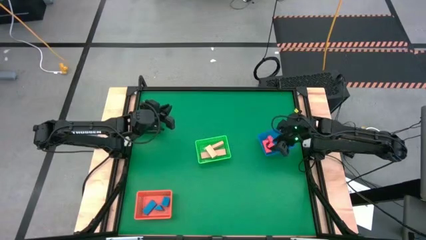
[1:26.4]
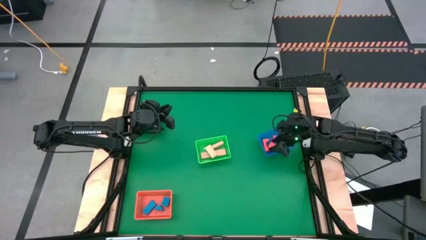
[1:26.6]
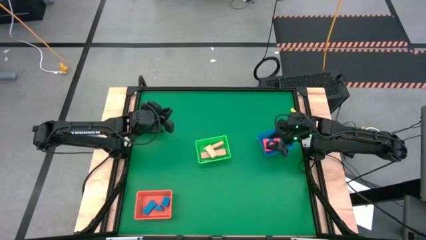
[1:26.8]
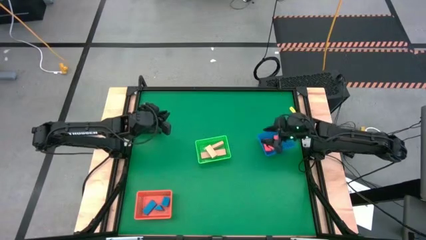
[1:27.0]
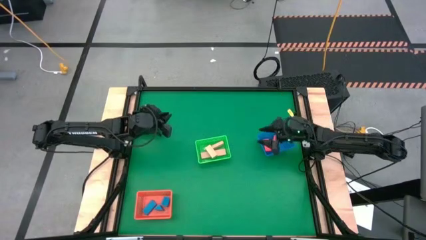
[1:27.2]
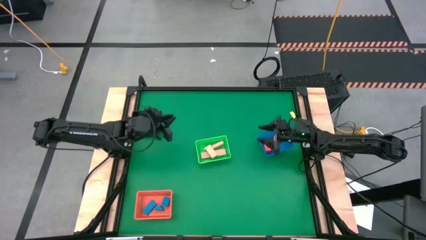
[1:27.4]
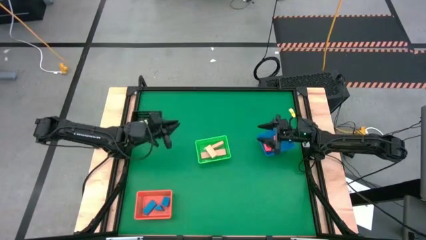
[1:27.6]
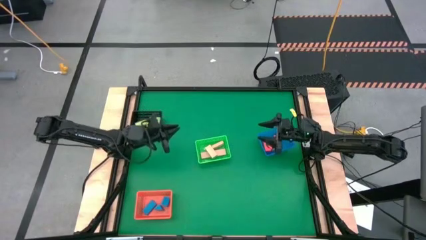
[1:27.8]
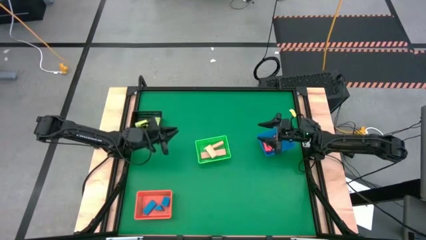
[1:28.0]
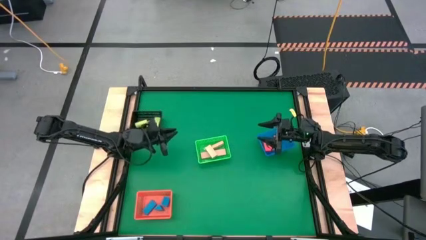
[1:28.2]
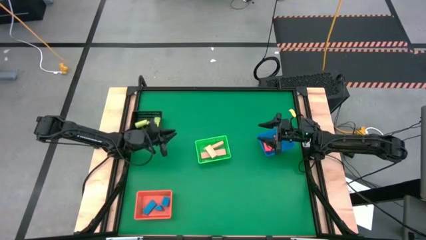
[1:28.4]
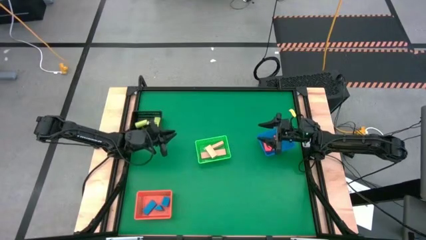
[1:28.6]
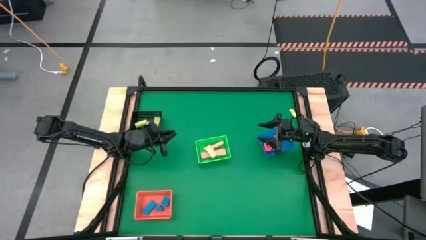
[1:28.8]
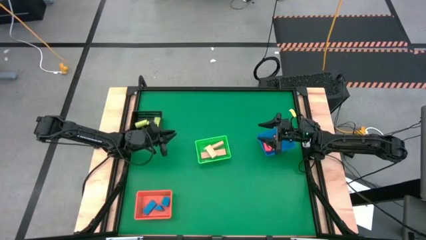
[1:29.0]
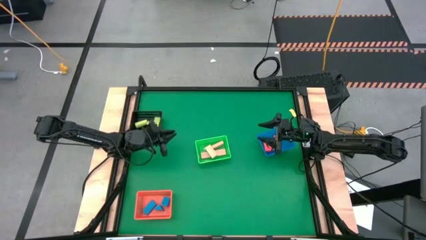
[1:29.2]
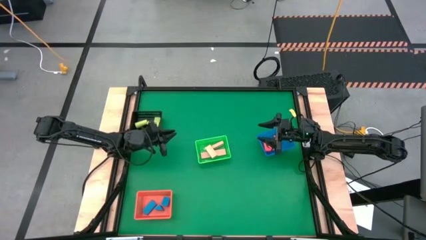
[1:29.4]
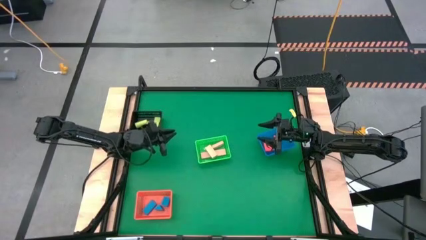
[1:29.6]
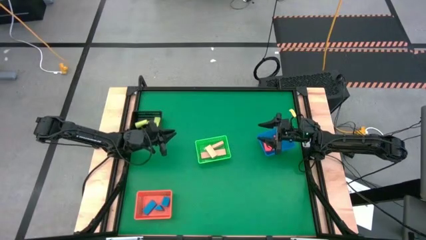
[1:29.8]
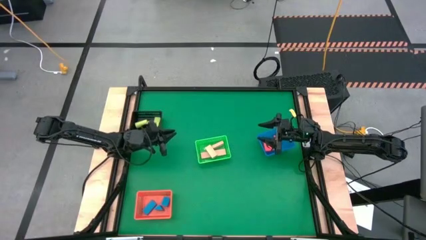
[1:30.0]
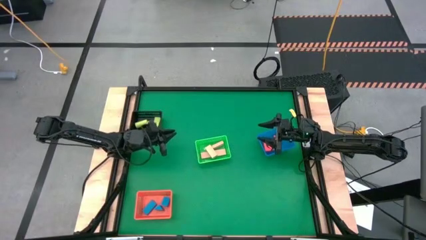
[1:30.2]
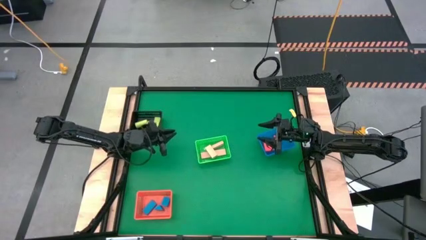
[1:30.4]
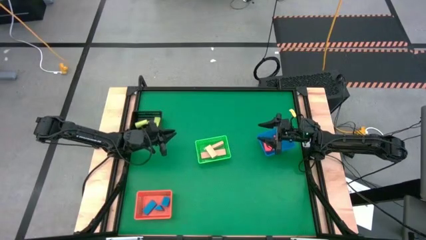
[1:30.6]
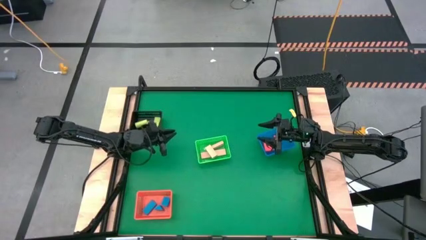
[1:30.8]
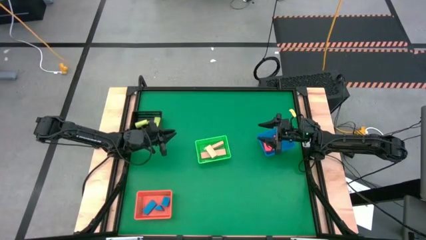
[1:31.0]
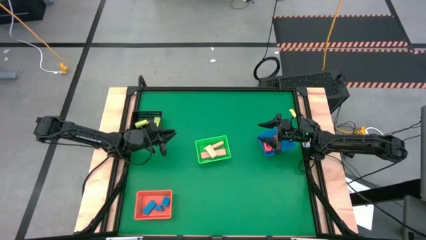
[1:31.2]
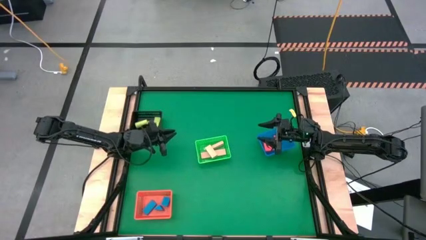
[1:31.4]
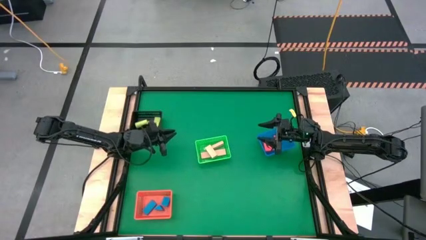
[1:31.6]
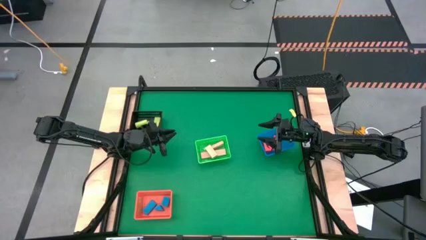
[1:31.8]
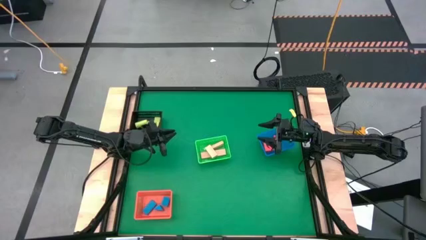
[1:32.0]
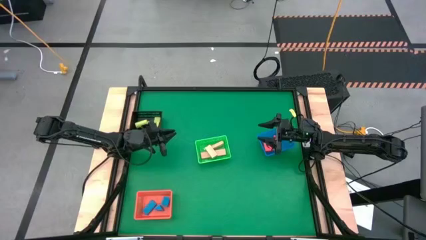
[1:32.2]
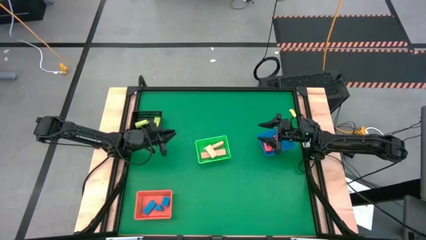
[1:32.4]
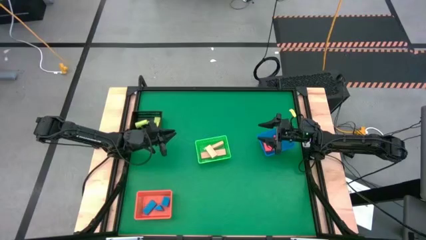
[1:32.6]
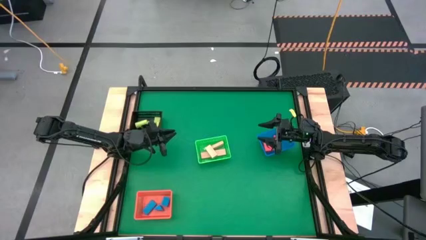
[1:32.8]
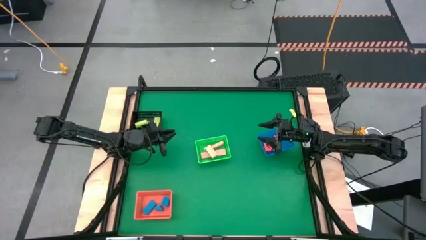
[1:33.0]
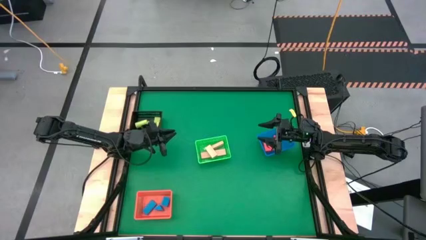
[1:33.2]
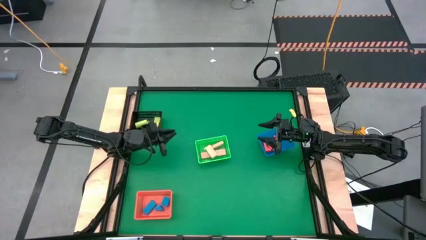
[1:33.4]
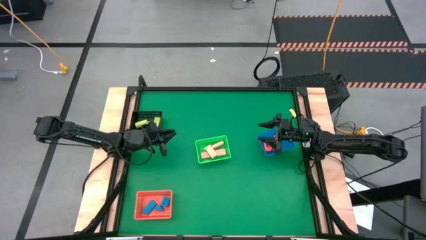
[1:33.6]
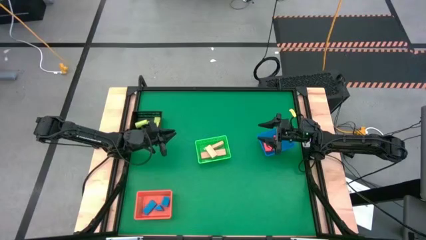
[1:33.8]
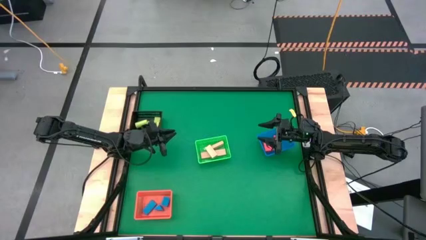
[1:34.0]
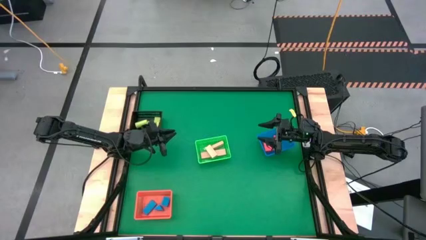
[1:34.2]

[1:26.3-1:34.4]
Task: Sort & place blocks by color
Return to Home Position

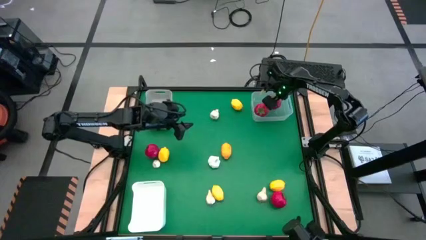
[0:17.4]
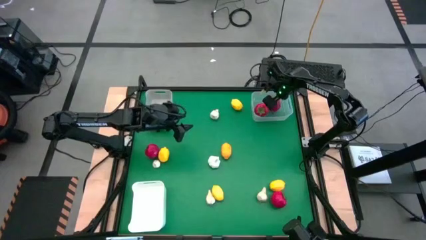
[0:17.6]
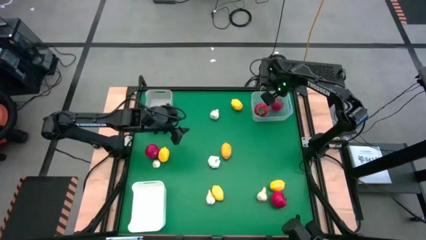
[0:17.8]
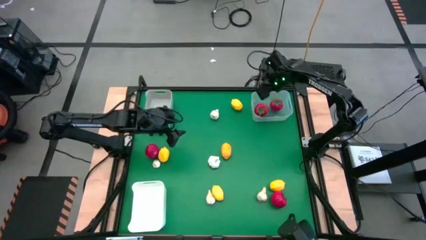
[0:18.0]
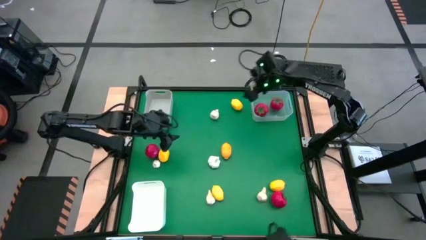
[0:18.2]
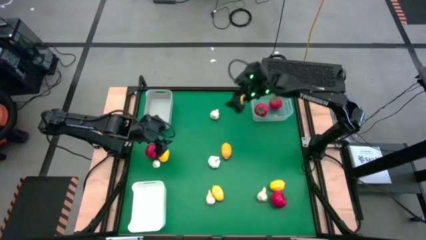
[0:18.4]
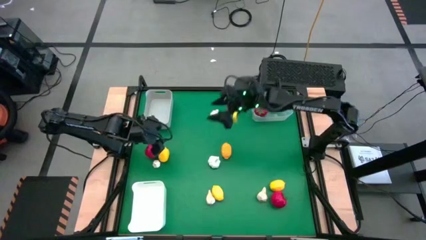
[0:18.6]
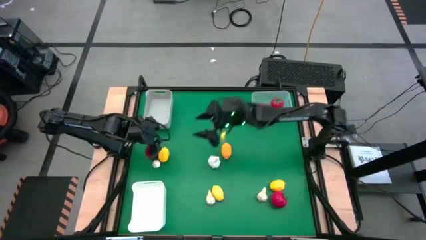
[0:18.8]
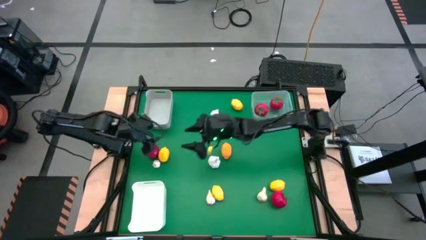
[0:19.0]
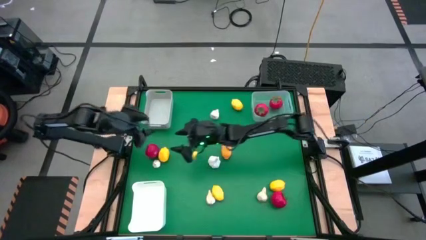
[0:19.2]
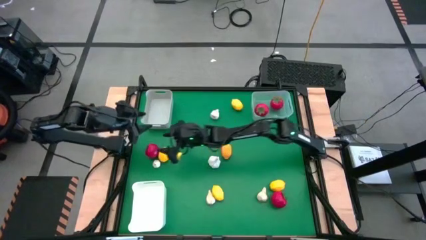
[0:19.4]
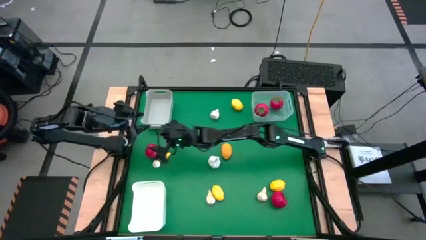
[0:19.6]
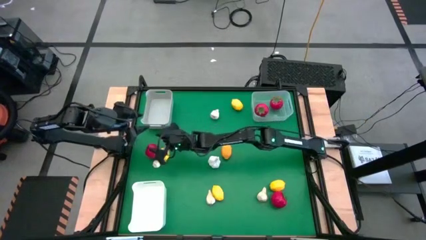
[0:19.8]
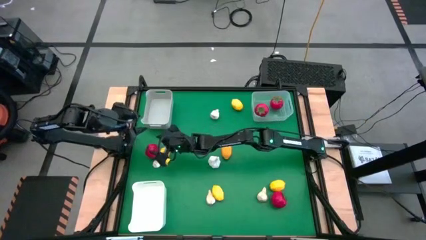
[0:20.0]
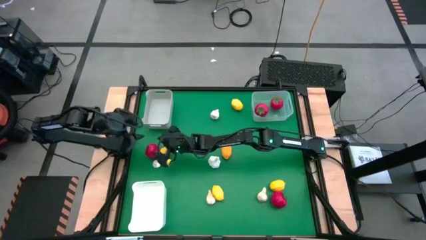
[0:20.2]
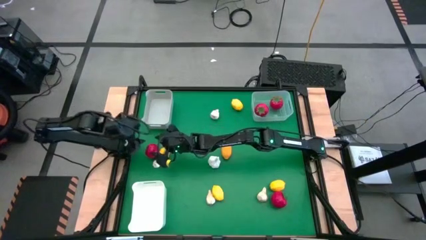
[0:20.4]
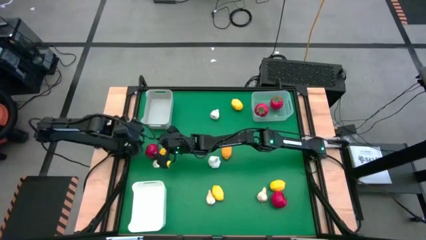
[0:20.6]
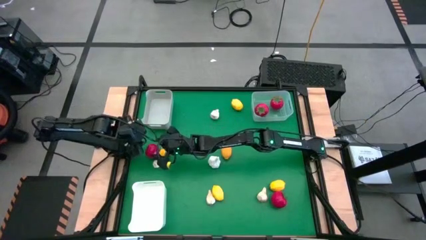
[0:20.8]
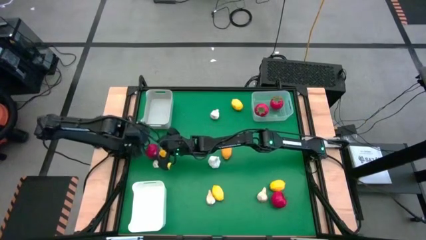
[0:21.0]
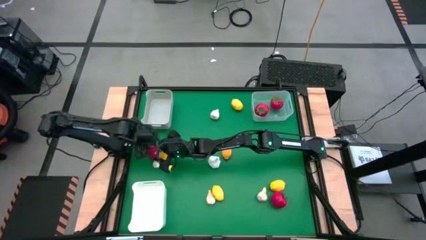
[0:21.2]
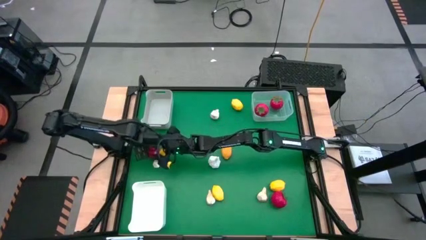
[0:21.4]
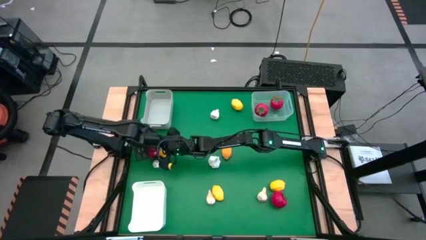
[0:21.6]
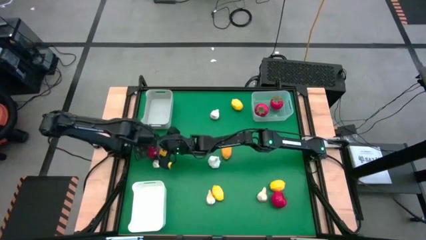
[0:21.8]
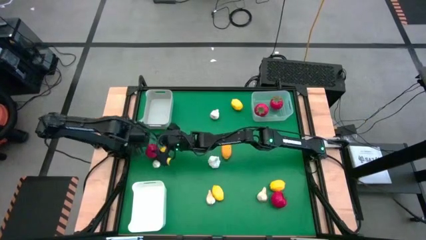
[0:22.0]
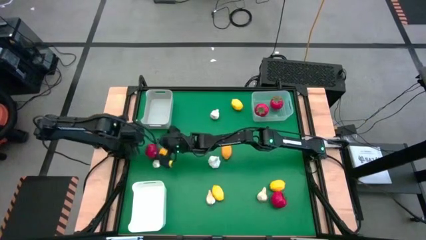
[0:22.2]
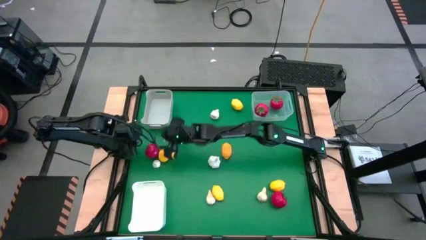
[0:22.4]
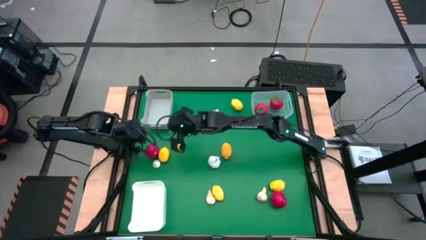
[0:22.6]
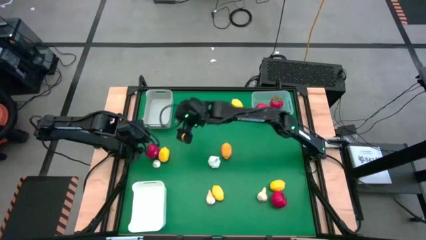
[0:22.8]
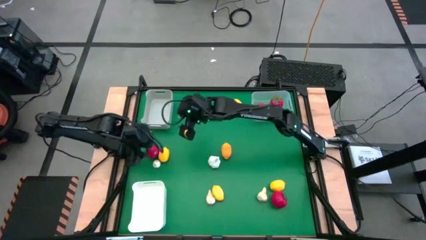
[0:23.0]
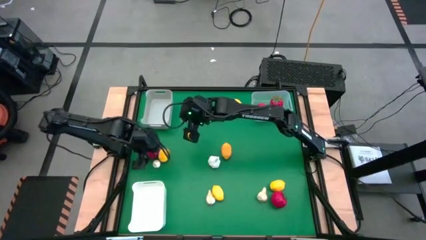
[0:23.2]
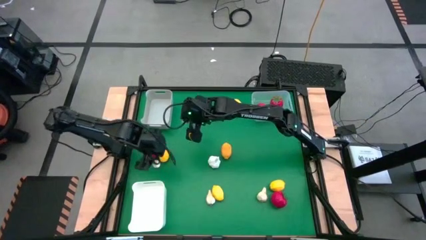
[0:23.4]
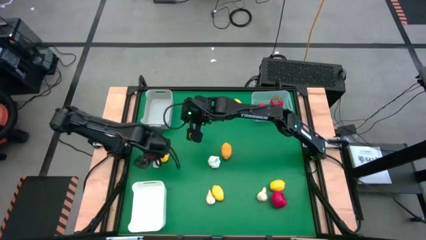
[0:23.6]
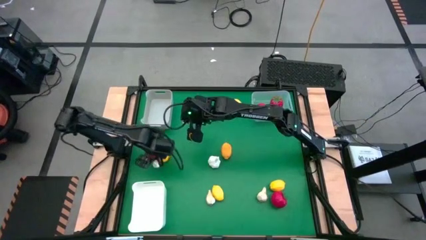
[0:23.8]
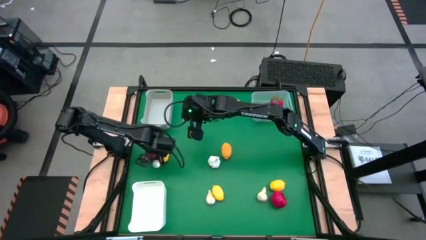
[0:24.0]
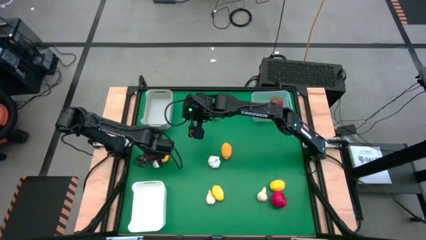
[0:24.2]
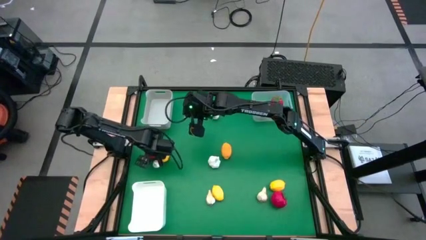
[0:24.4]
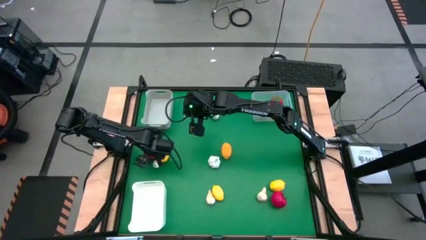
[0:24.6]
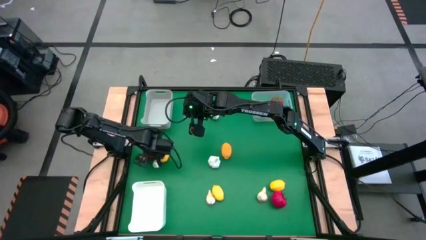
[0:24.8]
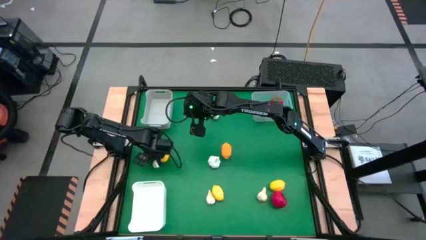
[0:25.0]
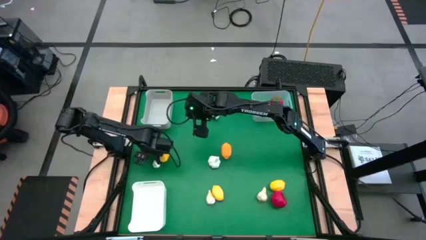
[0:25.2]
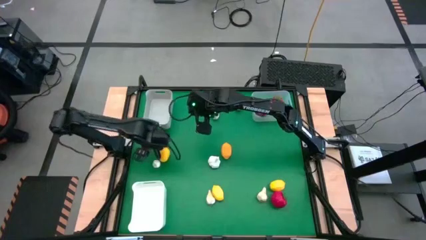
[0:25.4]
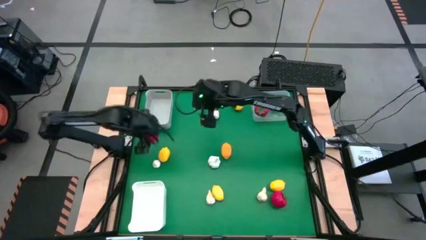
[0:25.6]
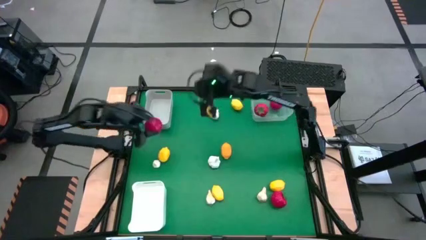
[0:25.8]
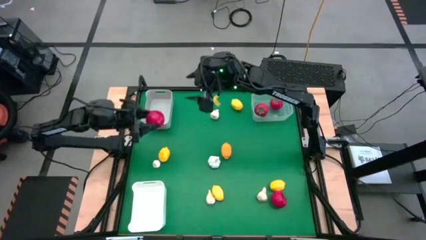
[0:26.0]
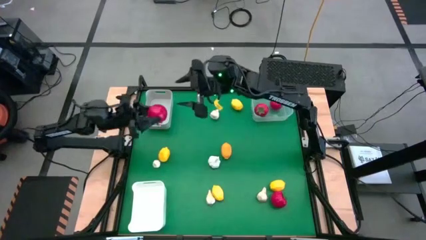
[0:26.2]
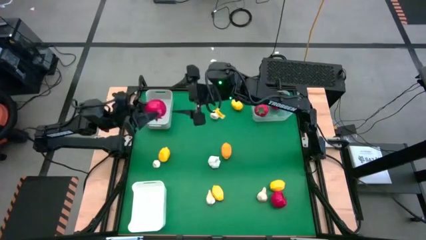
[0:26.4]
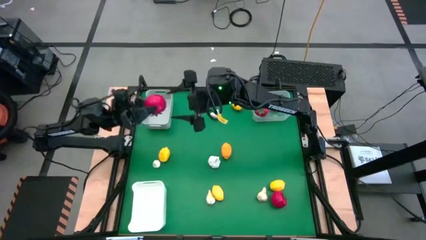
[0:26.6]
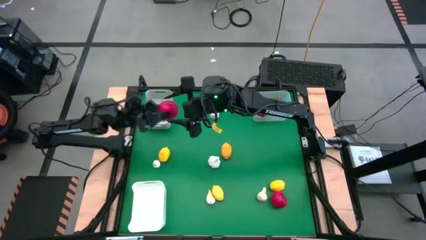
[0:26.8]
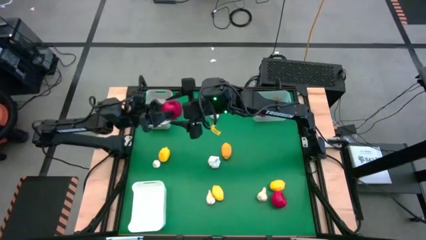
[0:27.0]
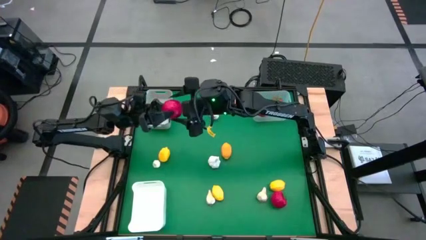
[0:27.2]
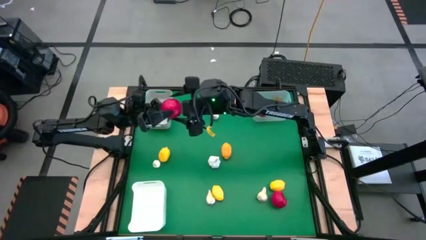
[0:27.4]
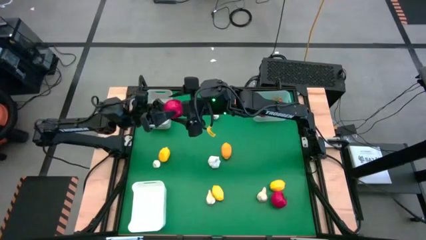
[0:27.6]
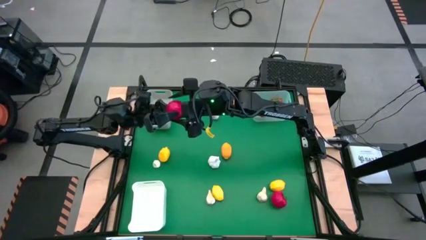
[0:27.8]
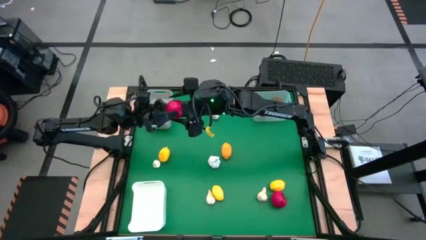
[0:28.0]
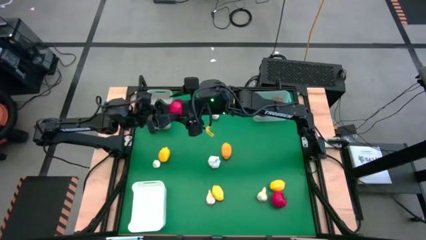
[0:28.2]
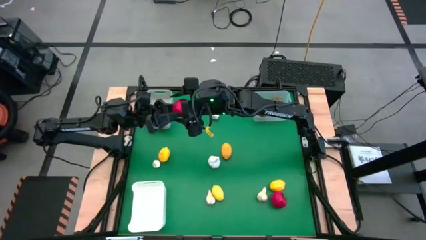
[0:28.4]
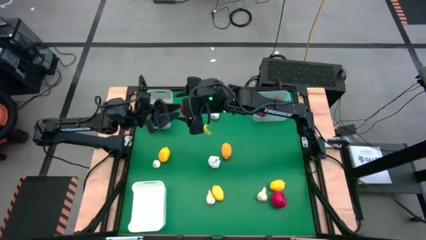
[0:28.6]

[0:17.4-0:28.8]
Task: Sort produce into baskets
Put the tomato into the transparent bin
